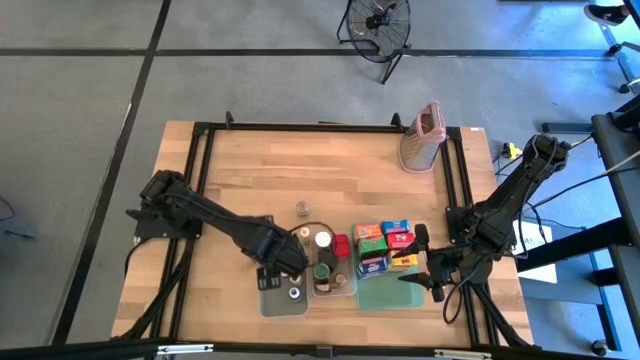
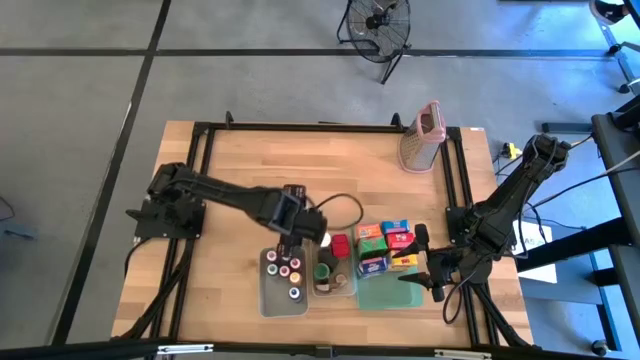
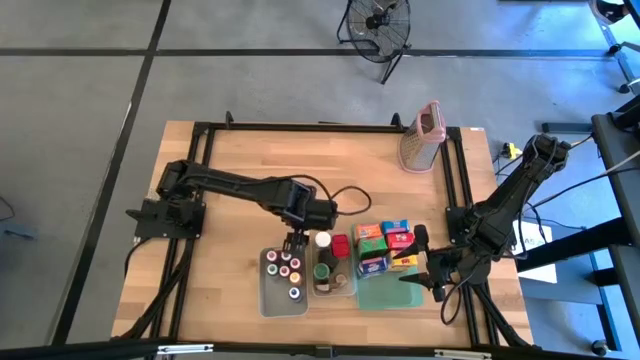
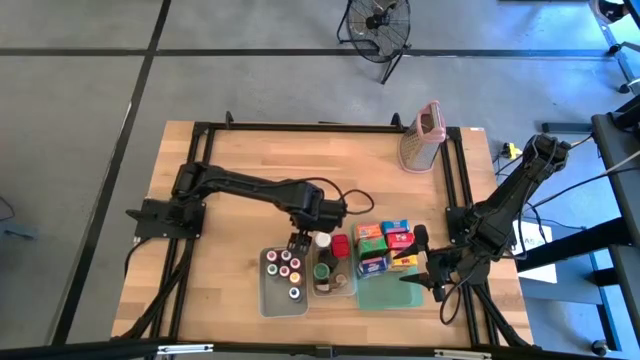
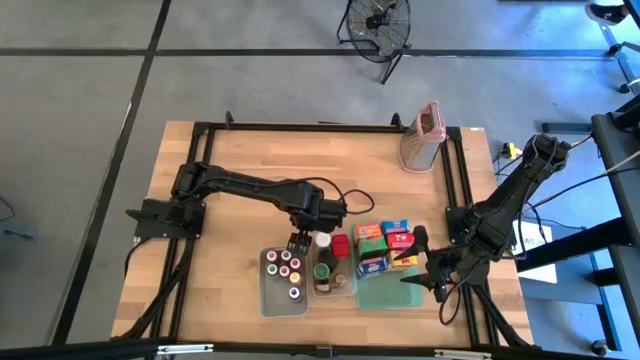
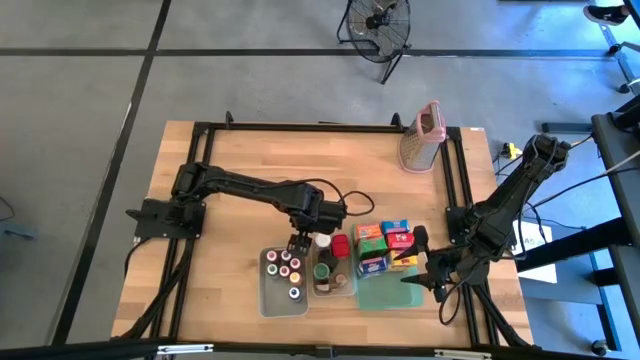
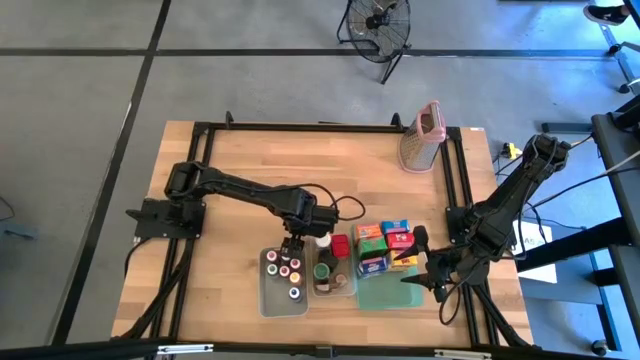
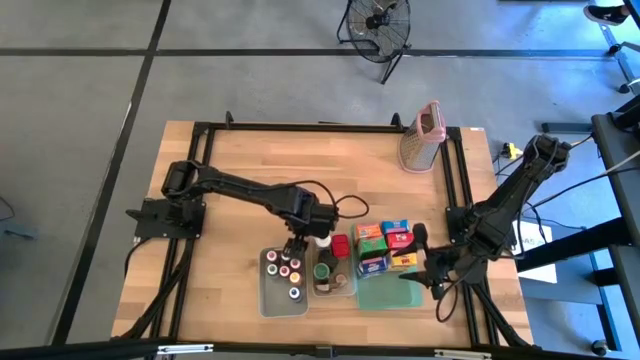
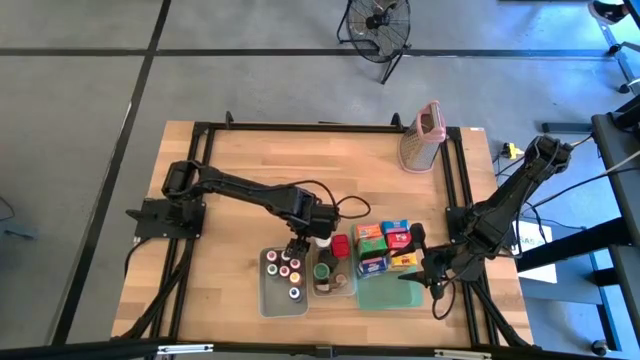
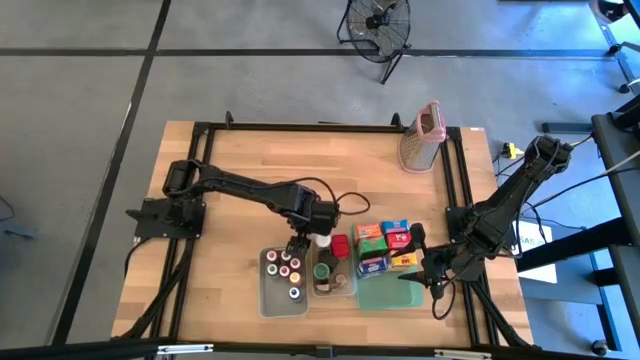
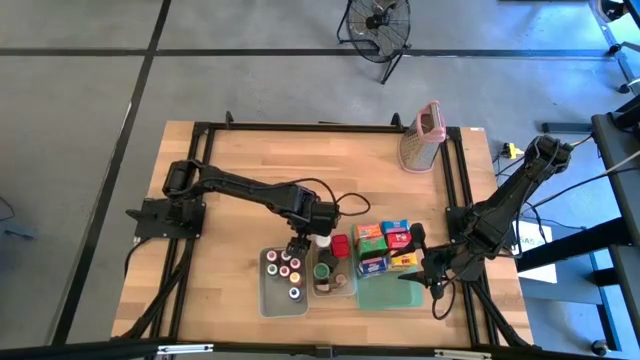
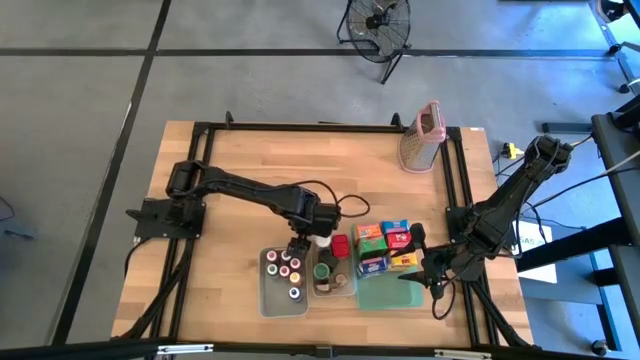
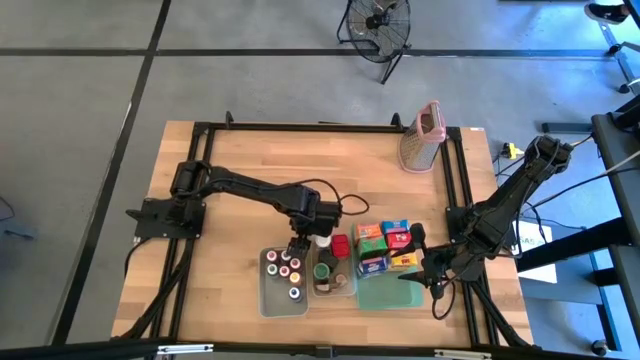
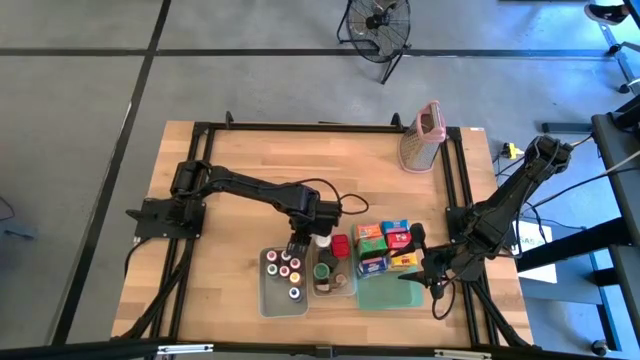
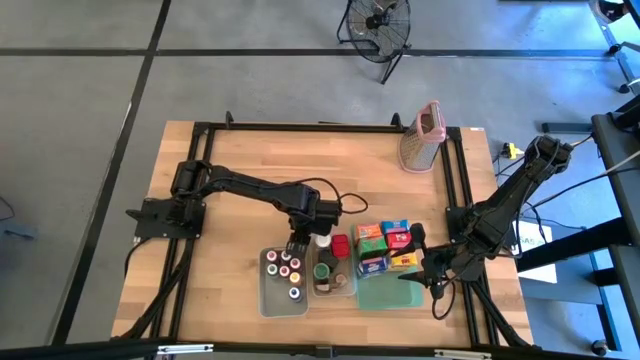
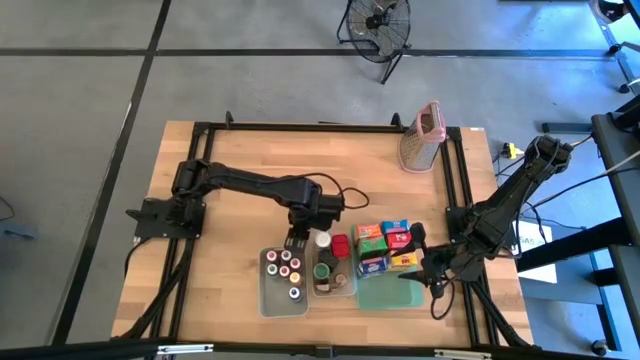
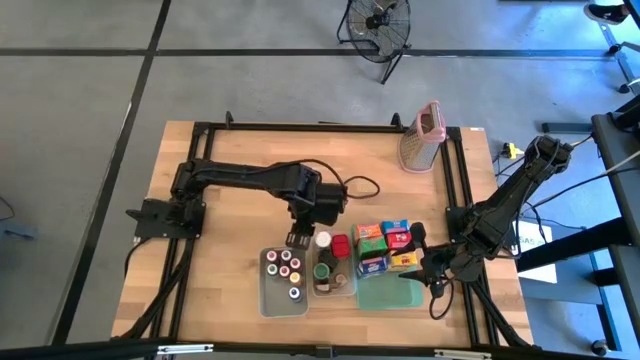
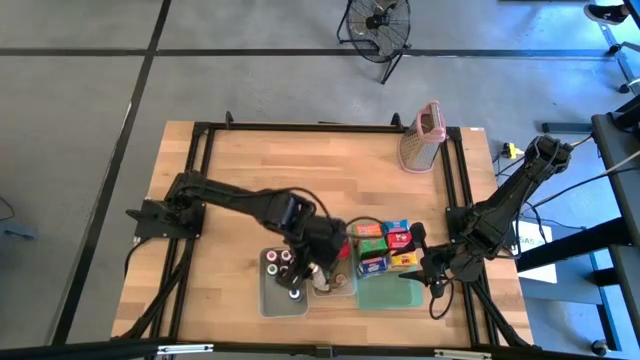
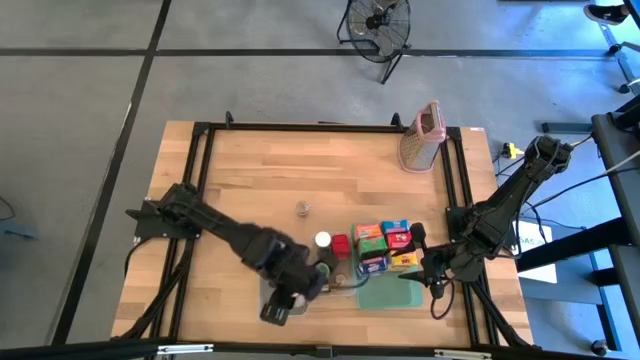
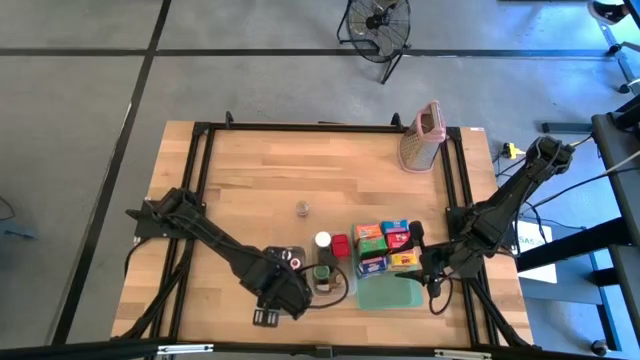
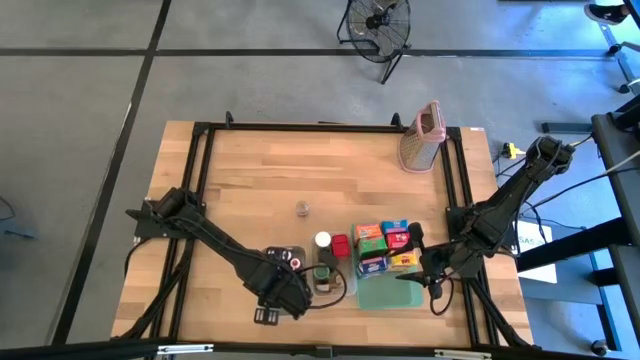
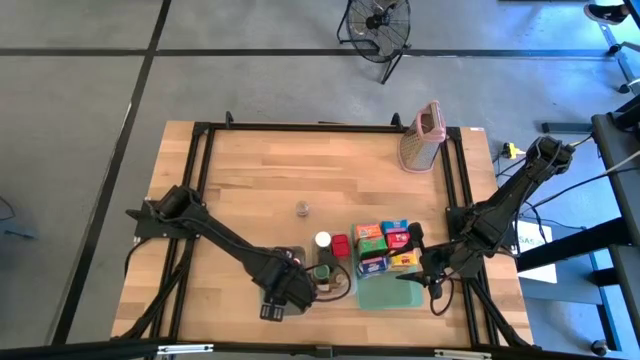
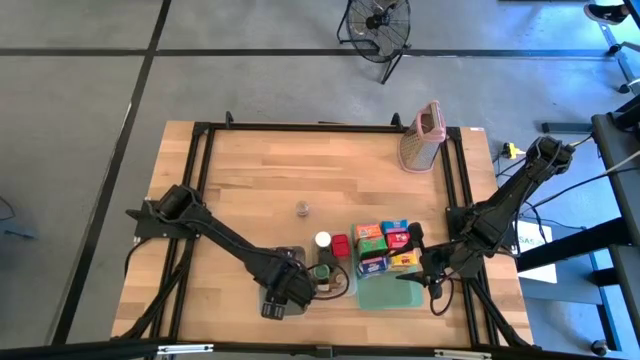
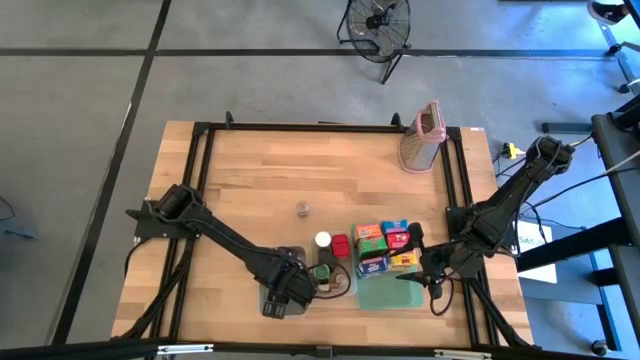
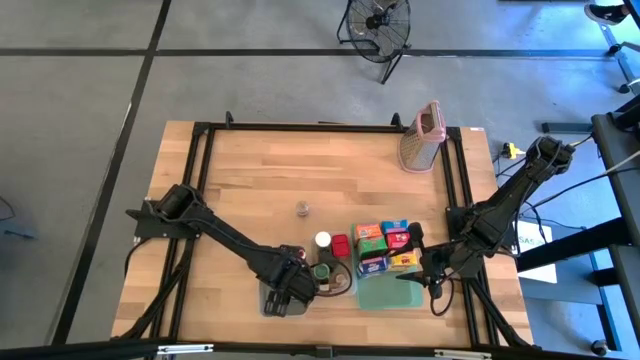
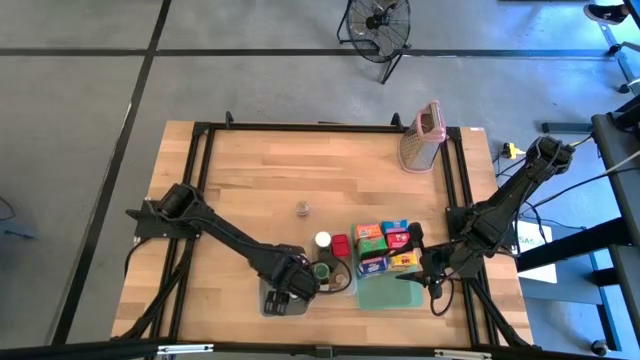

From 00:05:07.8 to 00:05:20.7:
Task: Pick & Place Kitchen Items
Put the yellow food coloring bottle into the gray bin

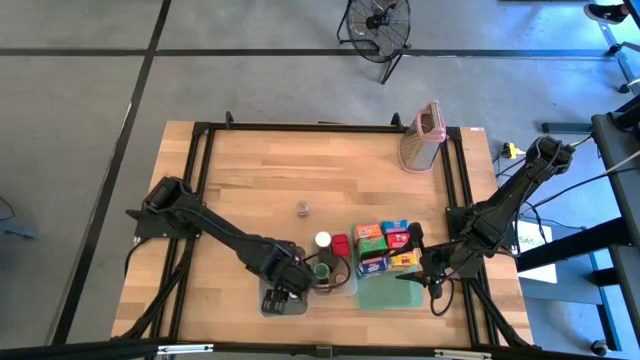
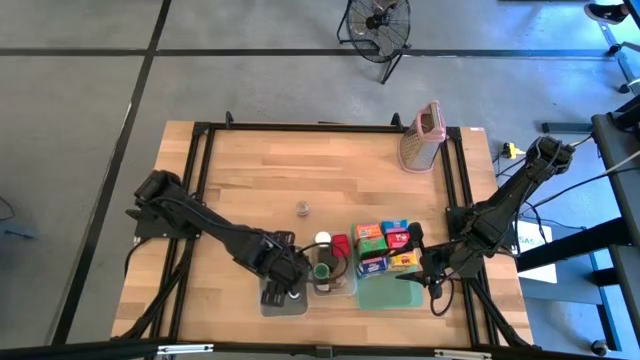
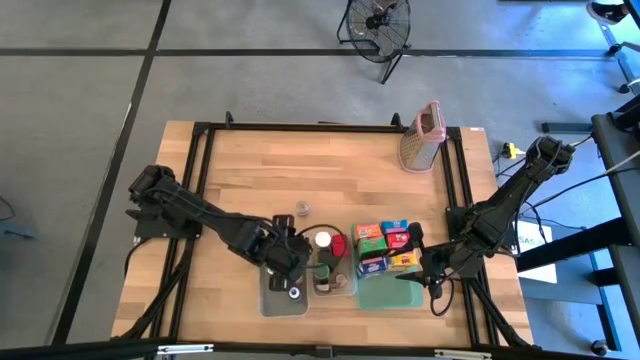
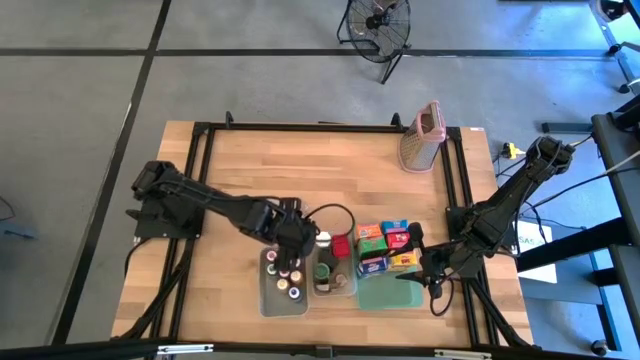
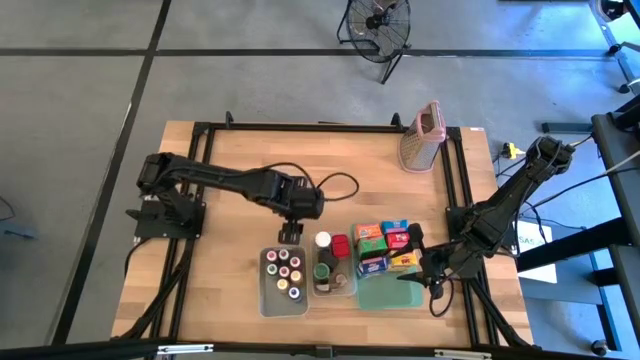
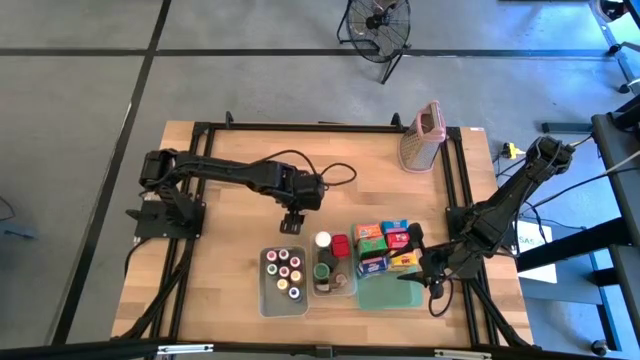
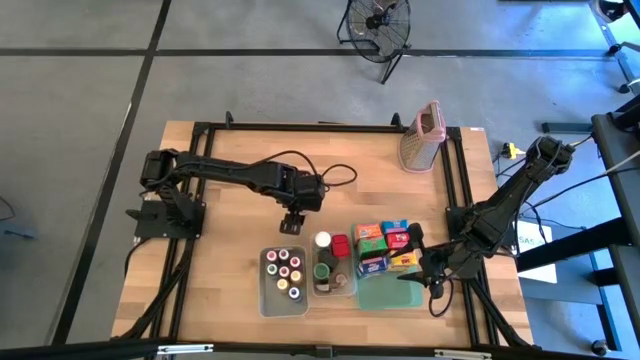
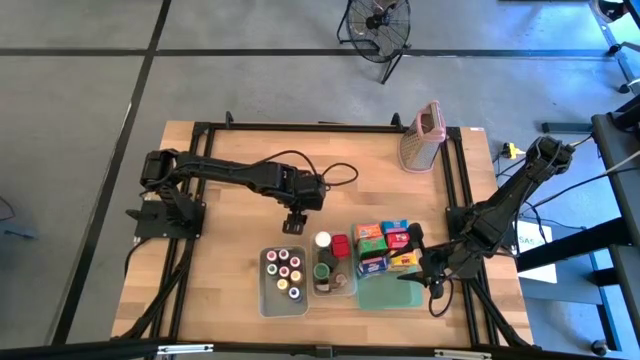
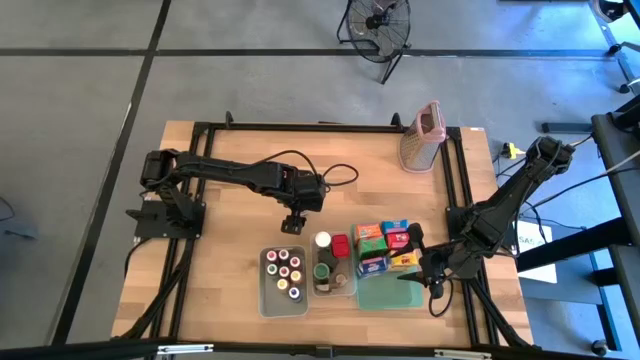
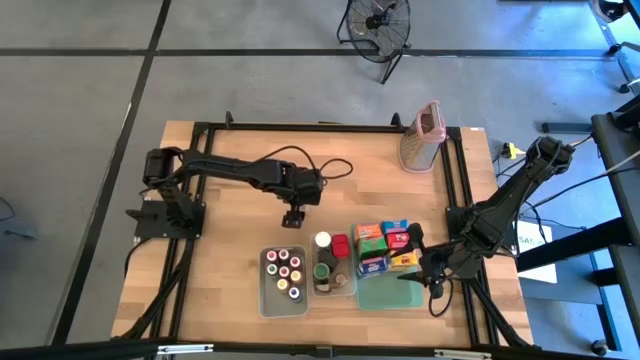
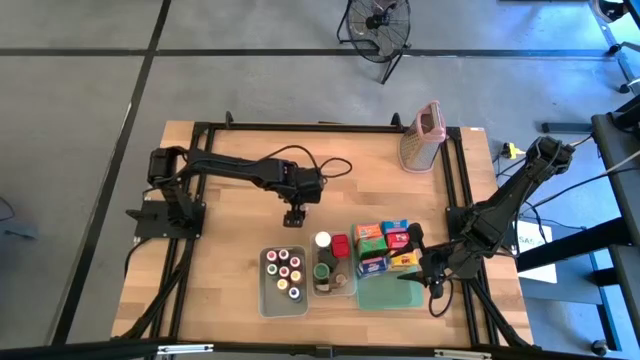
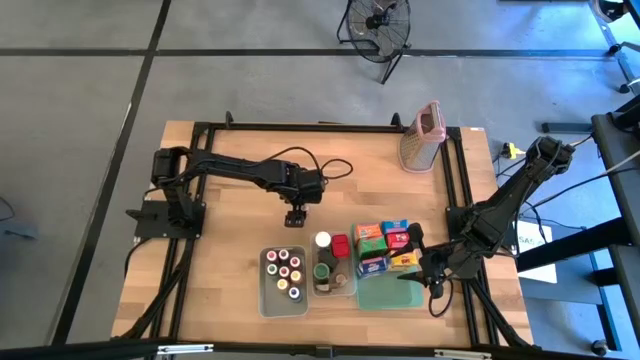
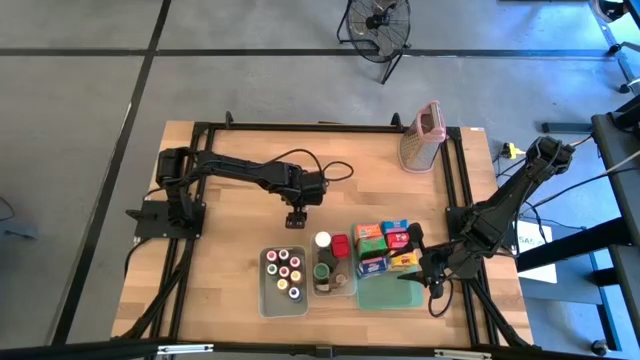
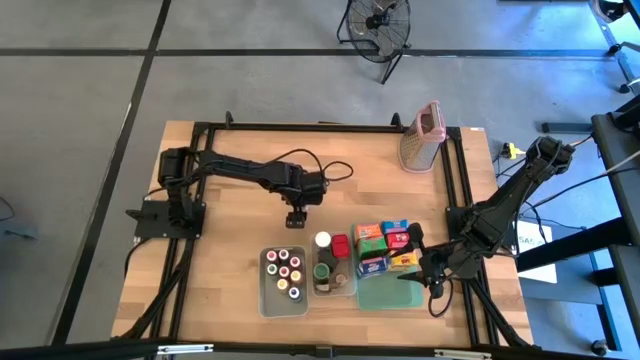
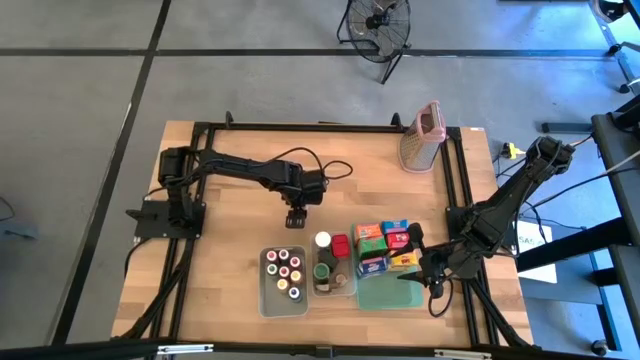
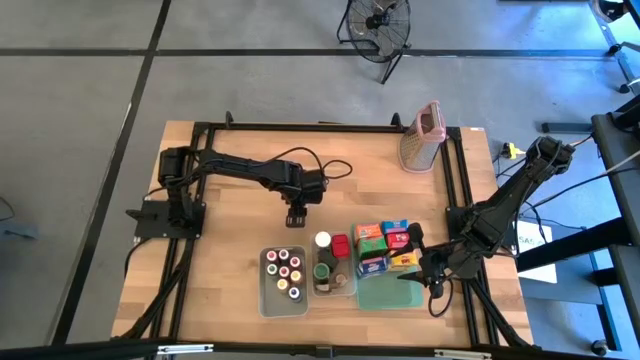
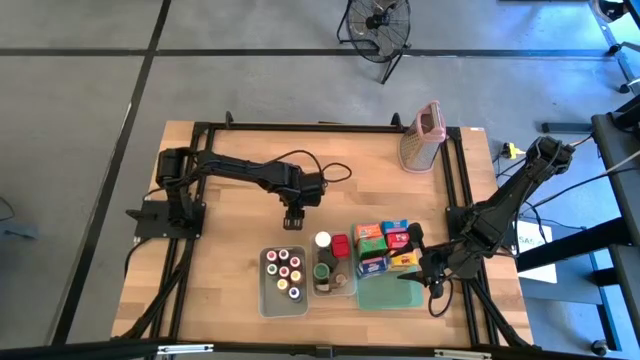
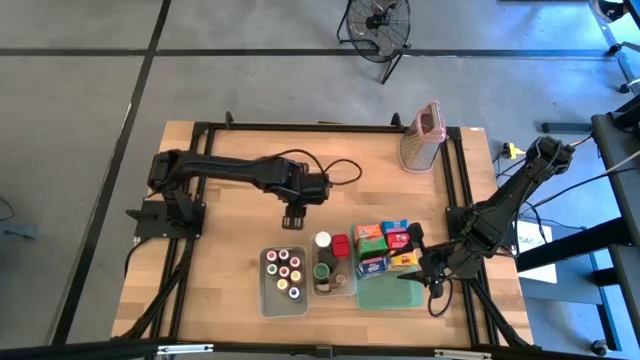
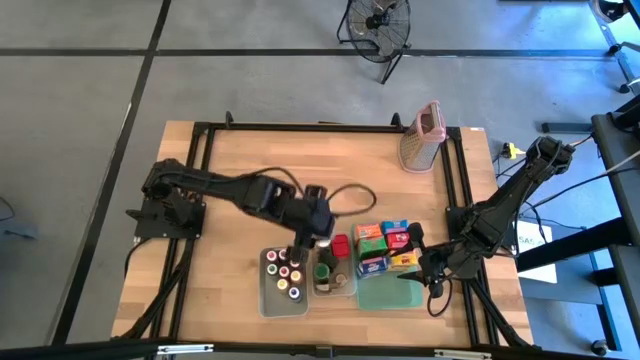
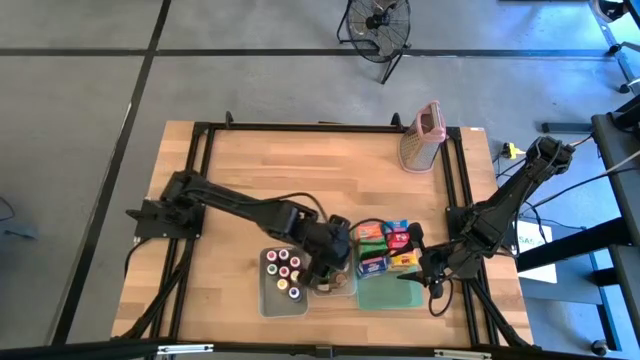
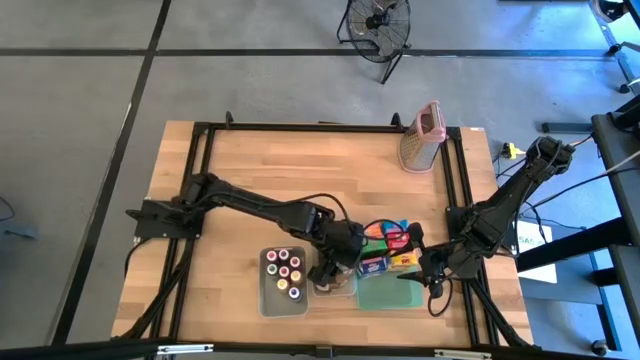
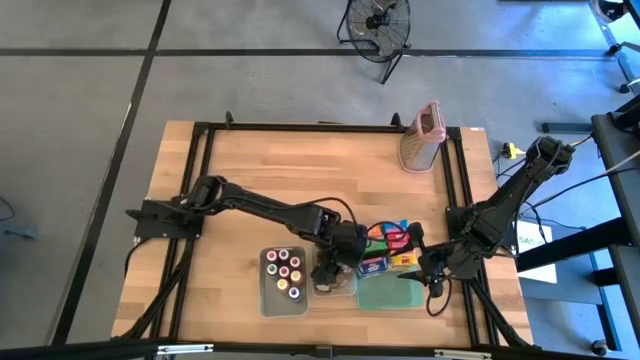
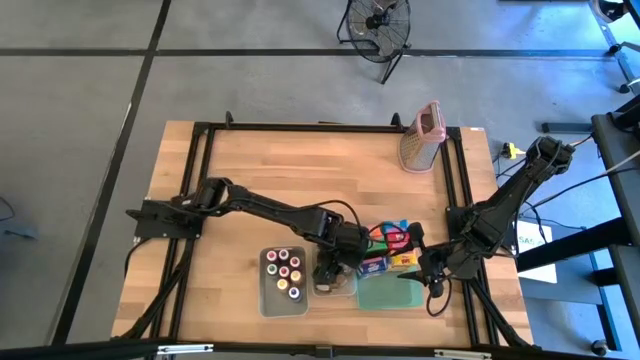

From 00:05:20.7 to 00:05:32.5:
Put the brown seasoning bottle into the white bin
